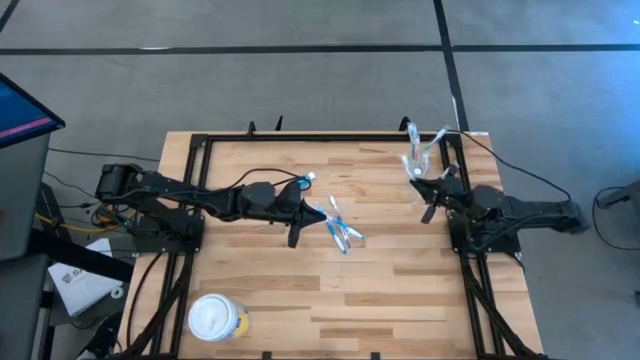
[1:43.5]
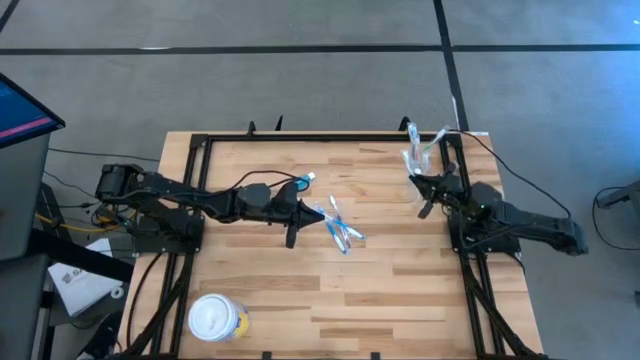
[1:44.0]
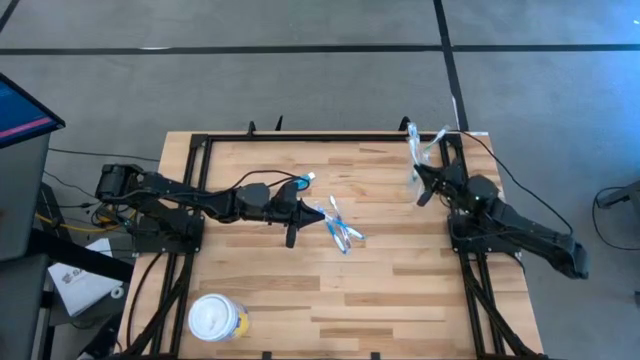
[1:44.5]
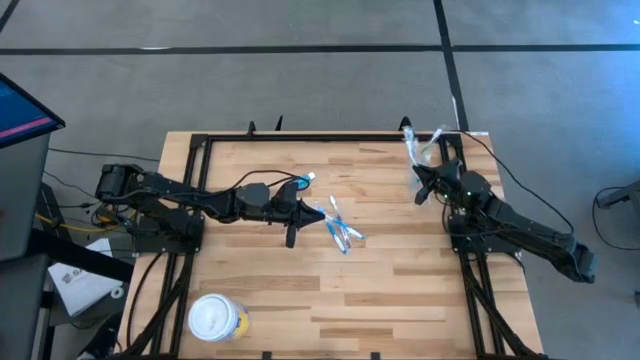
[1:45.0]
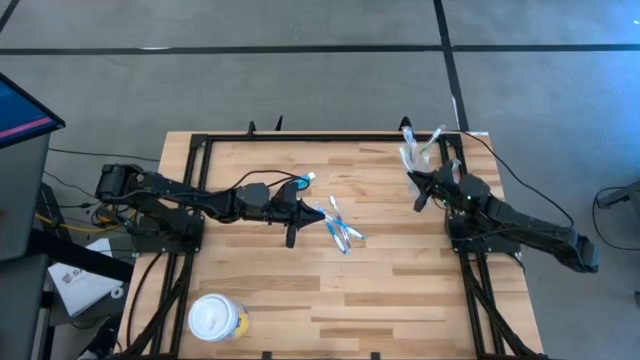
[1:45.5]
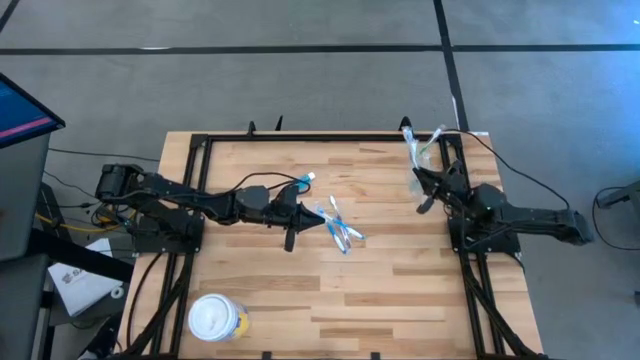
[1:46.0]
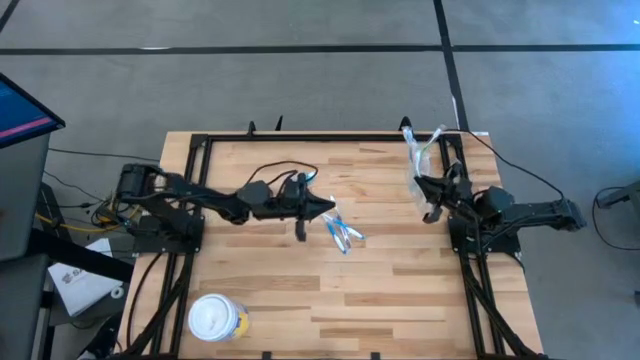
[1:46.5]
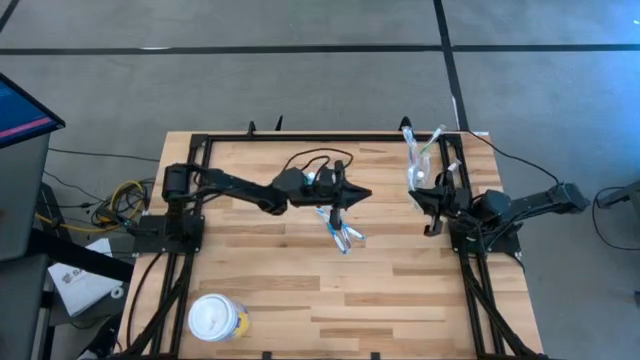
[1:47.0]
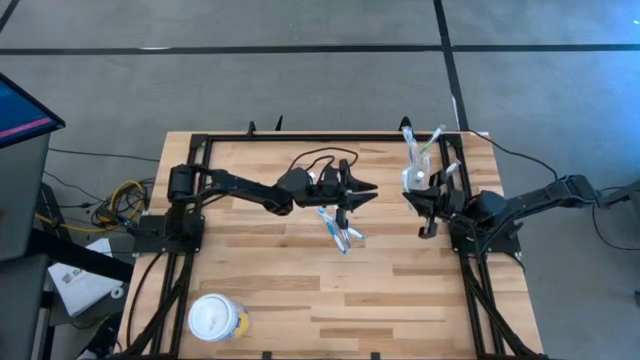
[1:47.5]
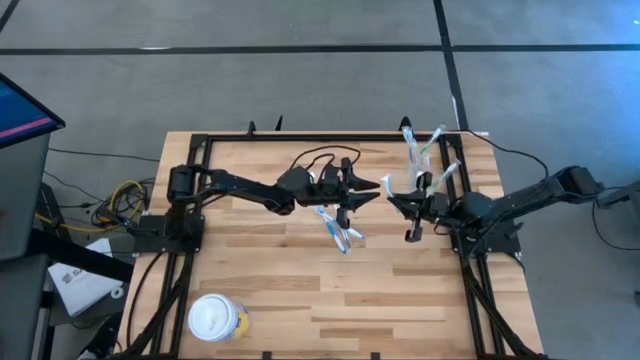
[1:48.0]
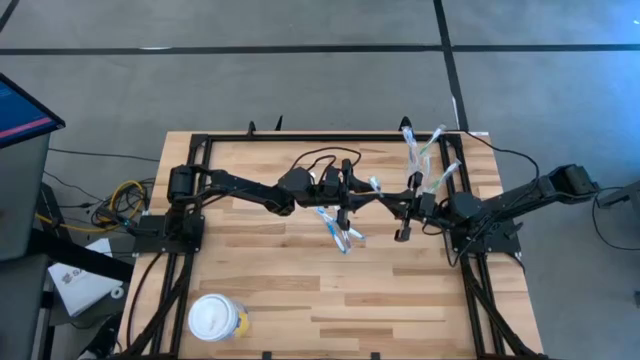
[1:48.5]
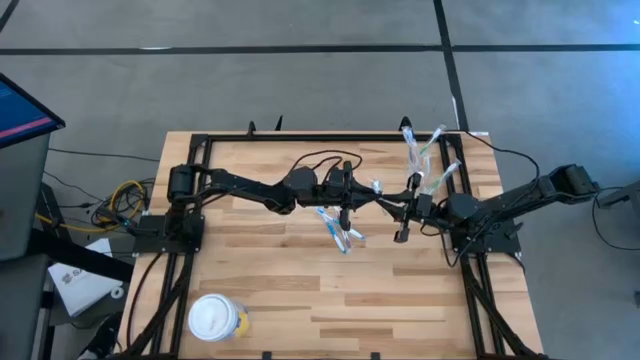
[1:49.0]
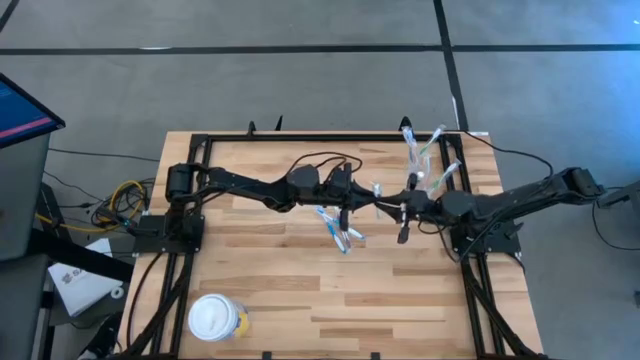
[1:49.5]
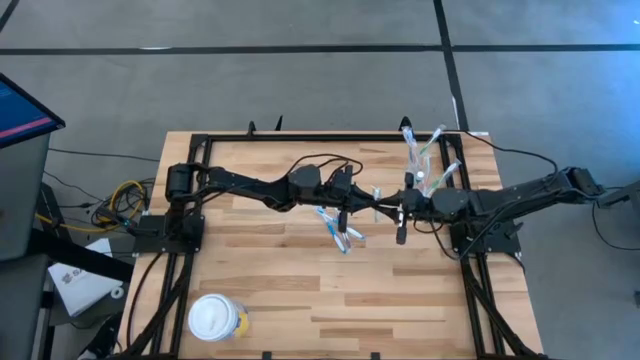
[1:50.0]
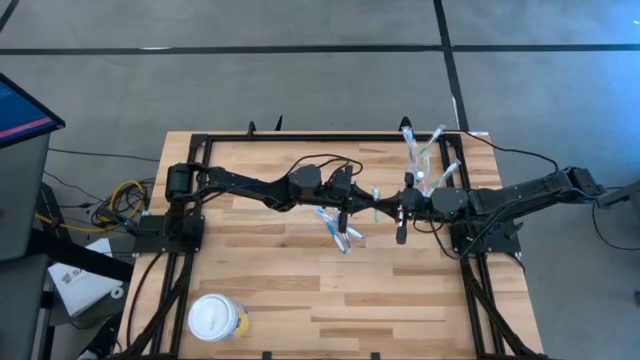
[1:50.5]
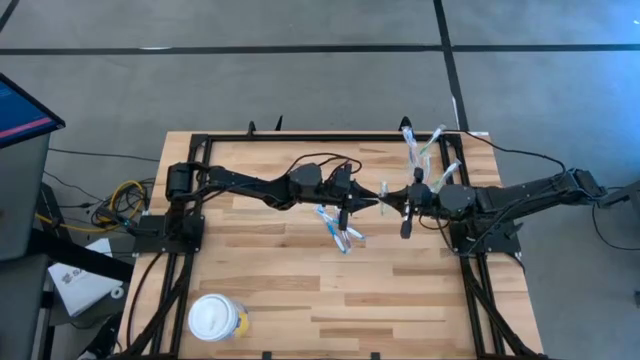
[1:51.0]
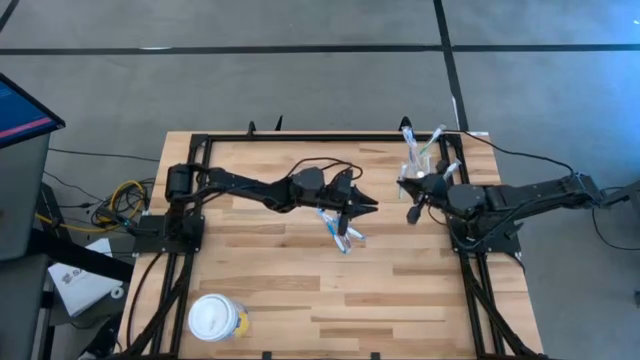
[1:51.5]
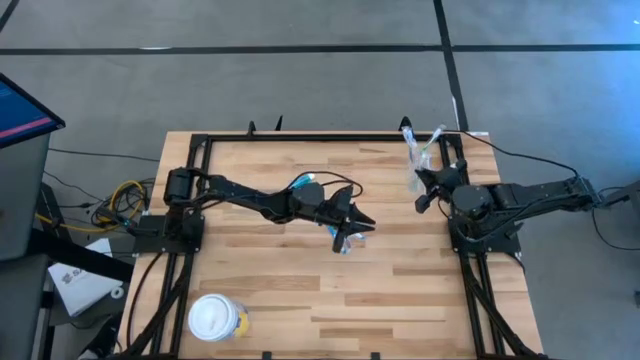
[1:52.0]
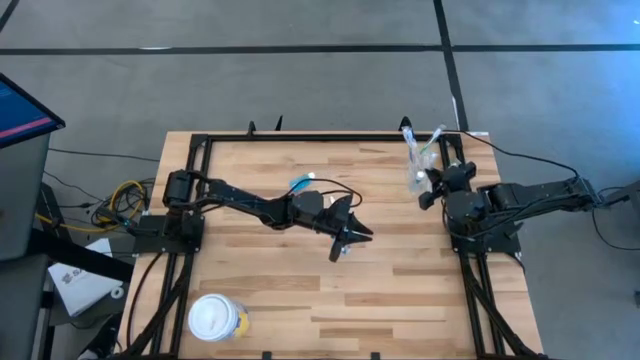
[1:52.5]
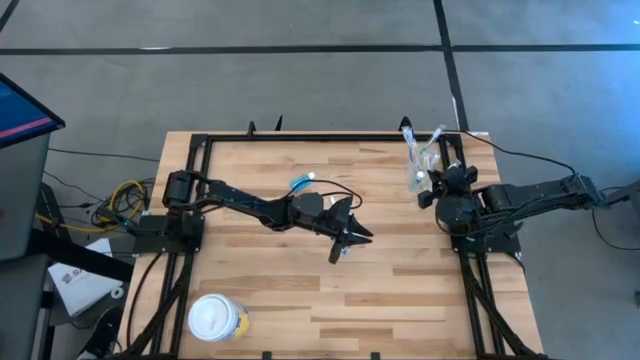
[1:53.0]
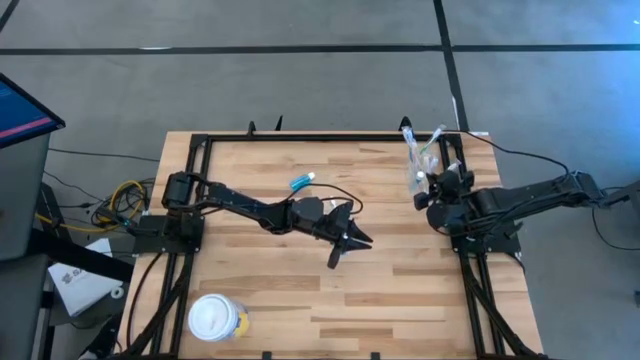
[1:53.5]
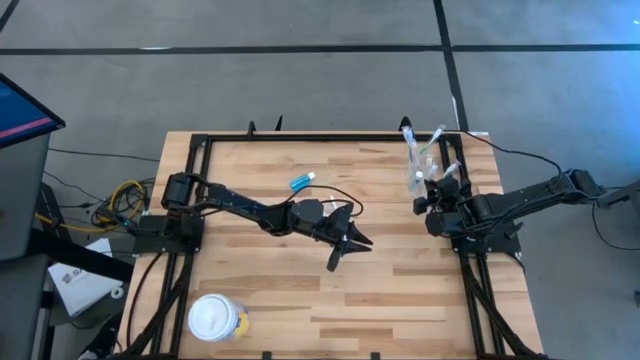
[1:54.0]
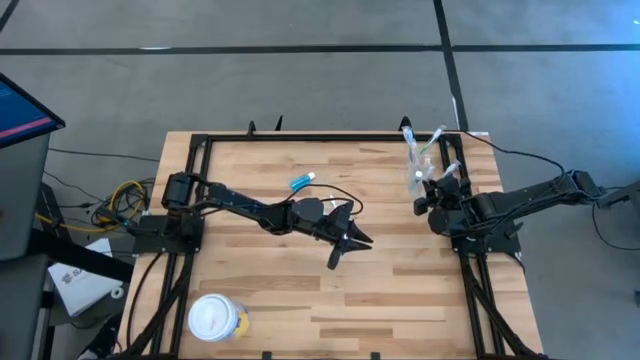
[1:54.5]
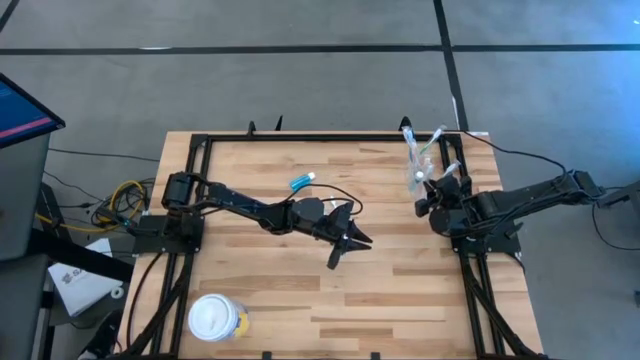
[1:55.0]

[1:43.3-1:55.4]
Task: Pick & Place toothbrushing station
Put the green toothbrush into the transparent organizer

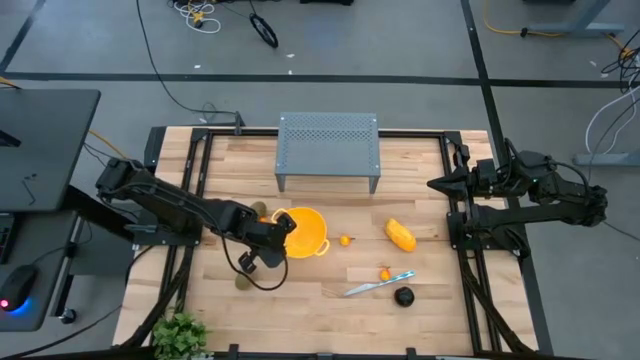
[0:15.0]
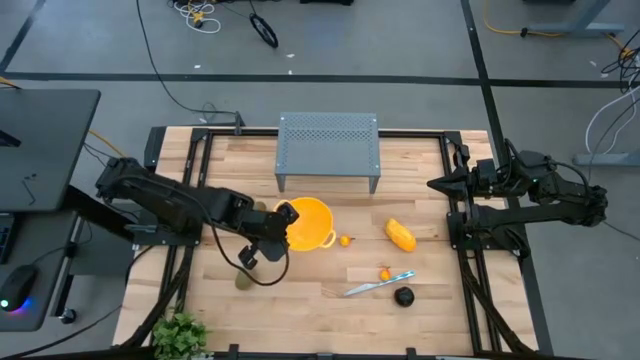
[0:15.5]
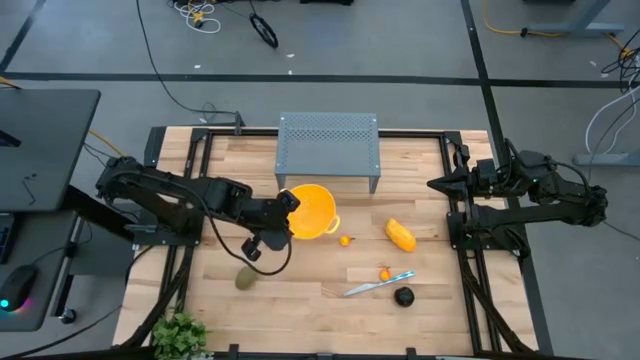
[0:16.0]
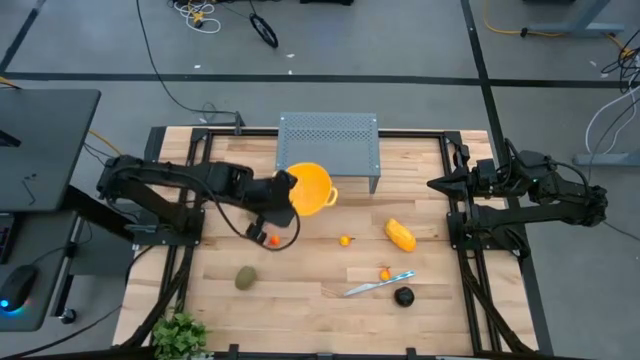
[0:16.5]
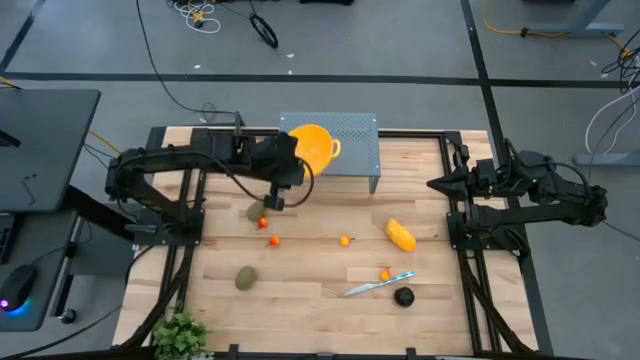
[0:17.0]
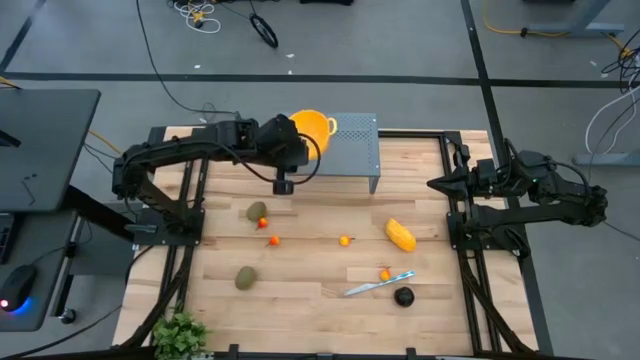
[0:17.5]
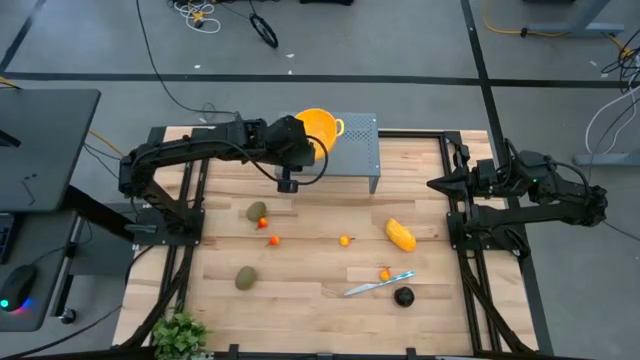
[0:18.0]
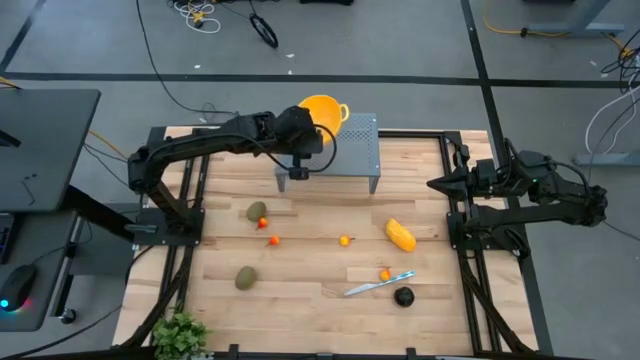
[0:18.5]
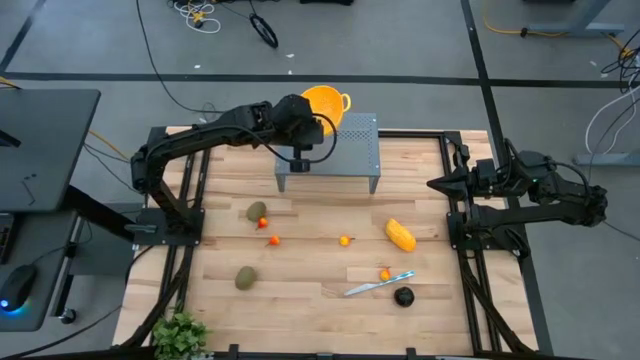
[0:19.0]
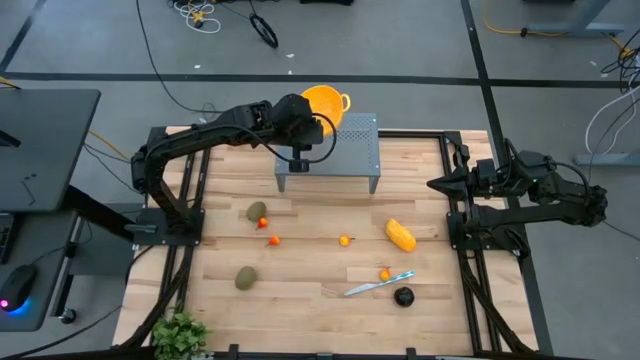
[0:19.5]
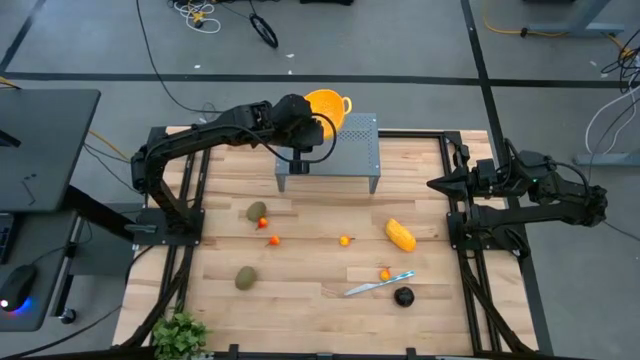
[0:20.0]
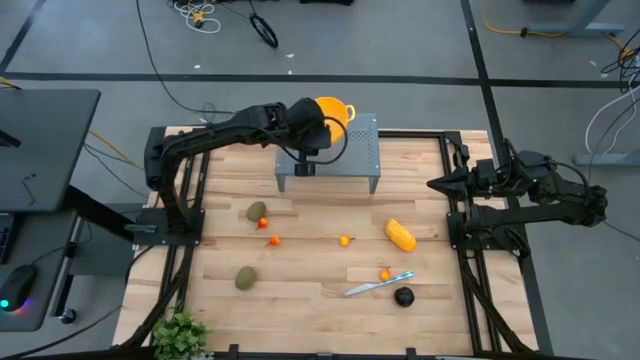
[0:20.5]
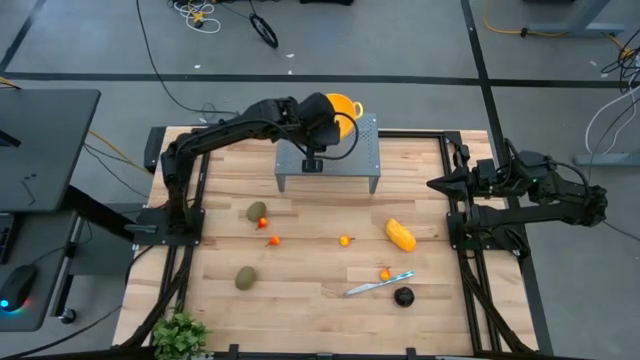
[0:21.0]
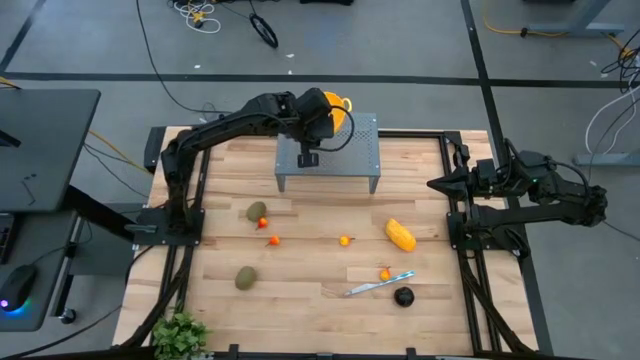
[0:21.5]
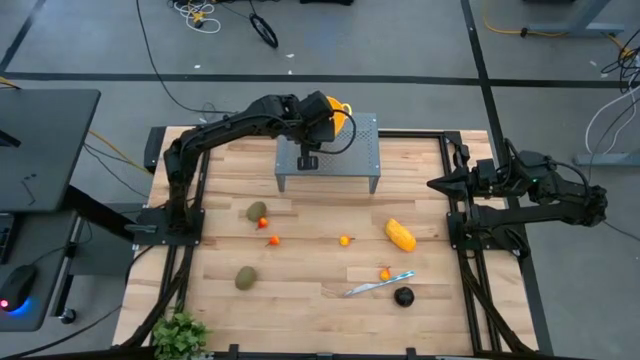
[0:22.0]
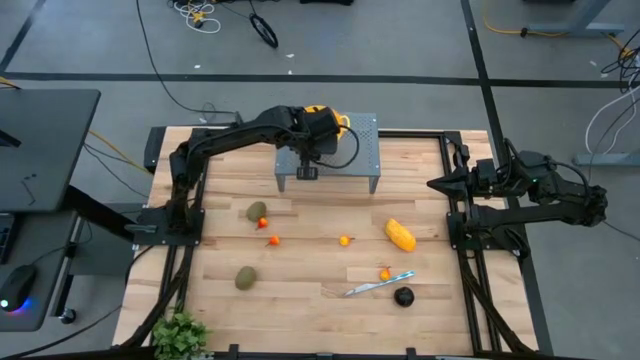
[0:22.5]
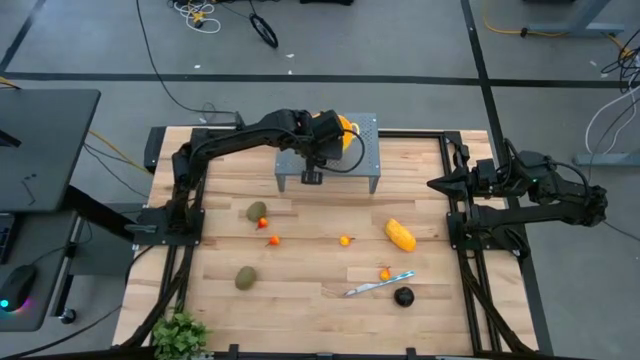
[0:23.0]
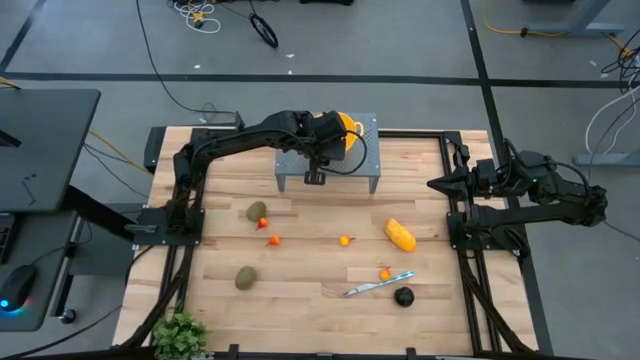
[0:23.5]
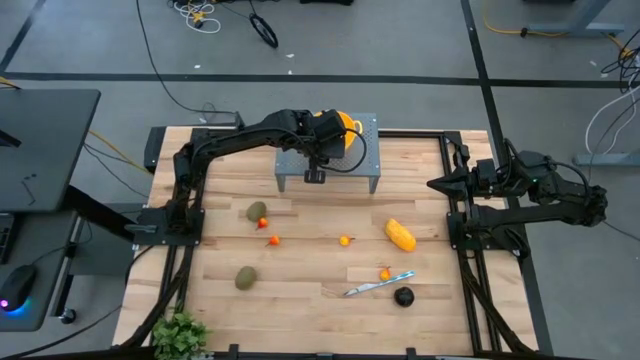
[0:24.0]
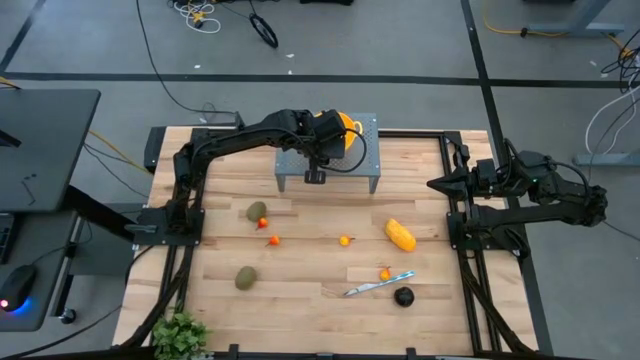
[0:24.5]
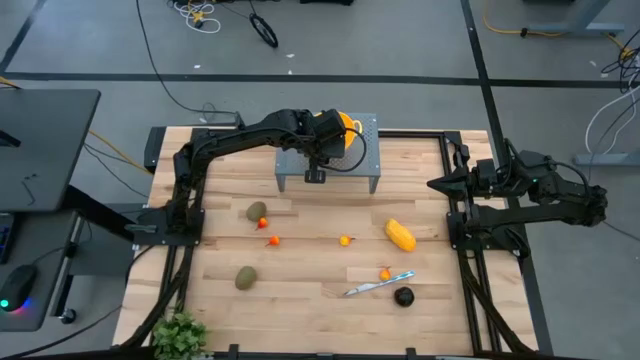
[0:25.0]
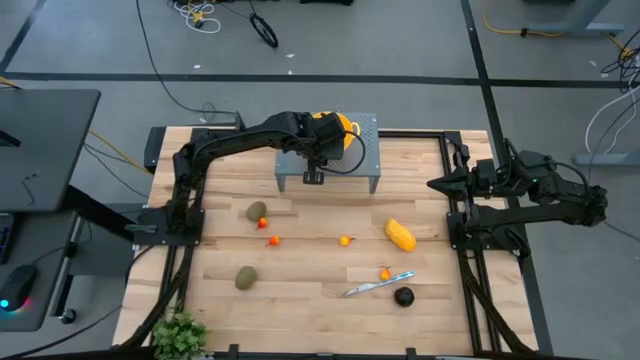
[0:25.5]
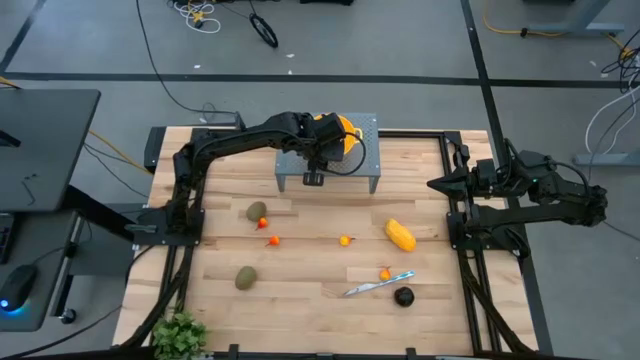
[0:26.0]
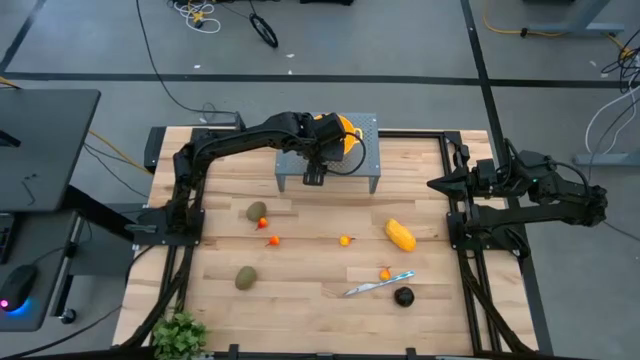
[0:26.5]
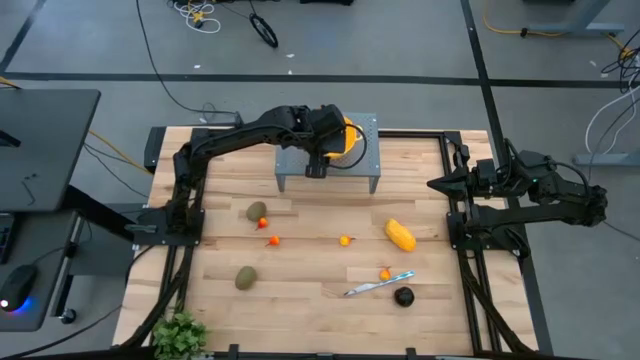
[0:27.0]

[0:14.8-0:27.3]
Task: Pick & Place Fruit
Put the yellow strainer bowl on the shelf
